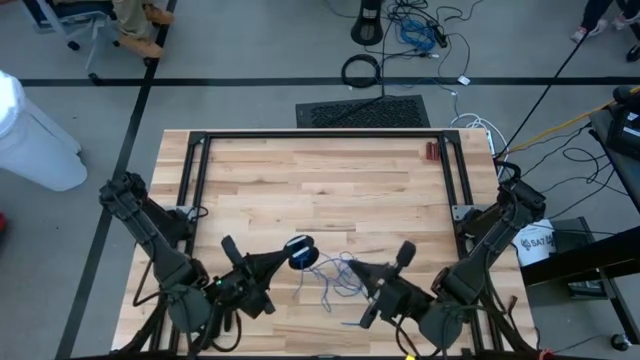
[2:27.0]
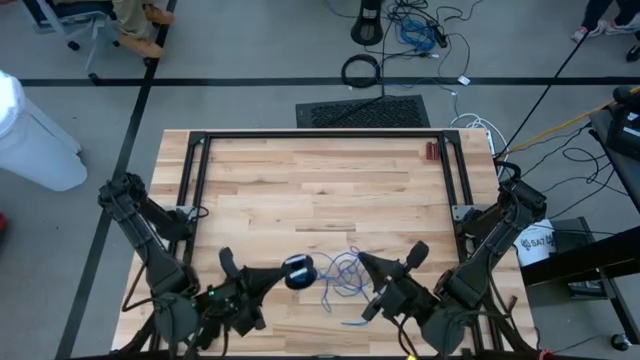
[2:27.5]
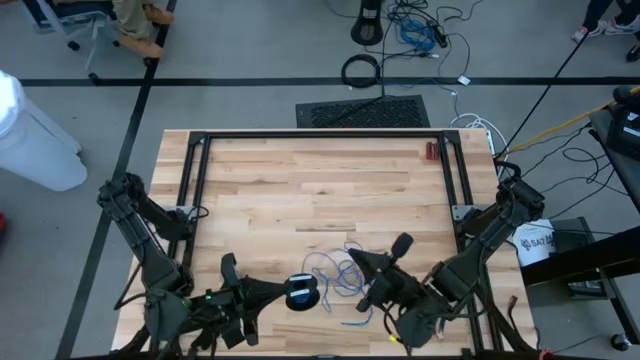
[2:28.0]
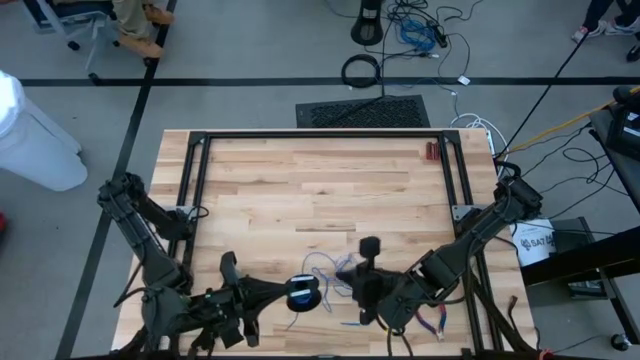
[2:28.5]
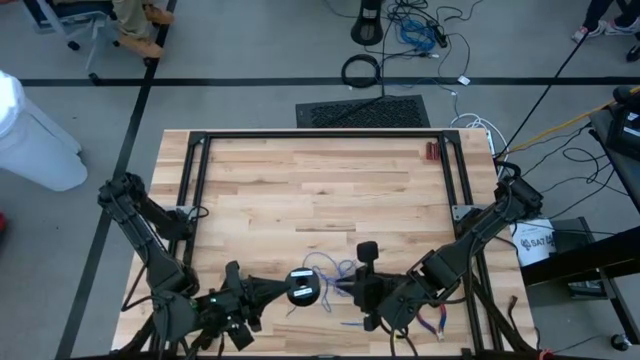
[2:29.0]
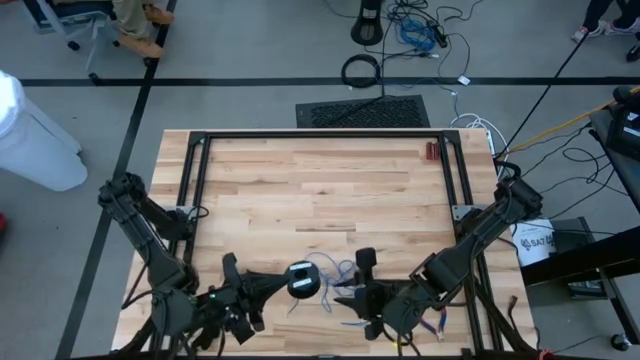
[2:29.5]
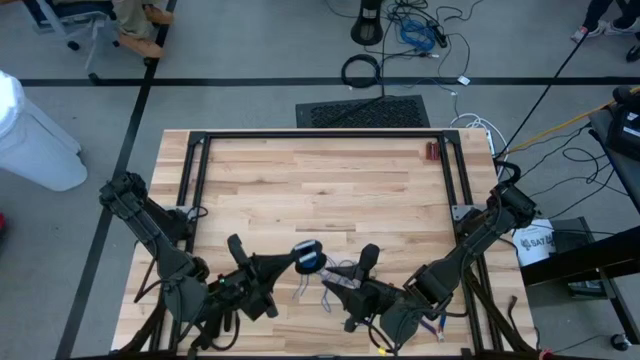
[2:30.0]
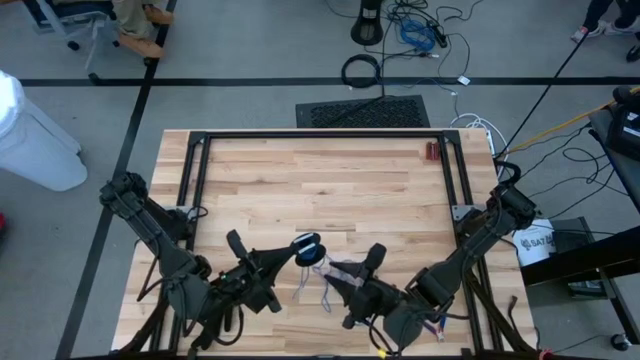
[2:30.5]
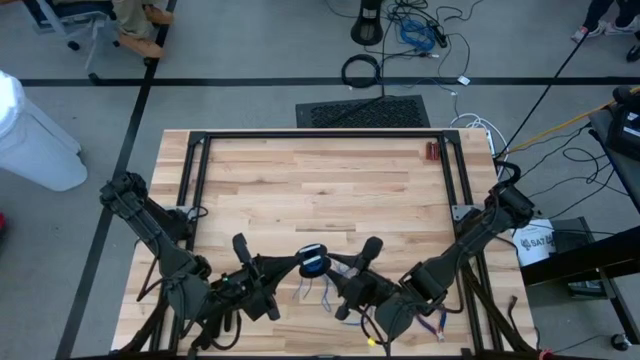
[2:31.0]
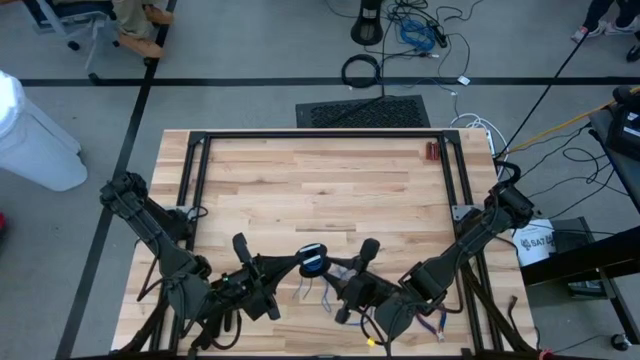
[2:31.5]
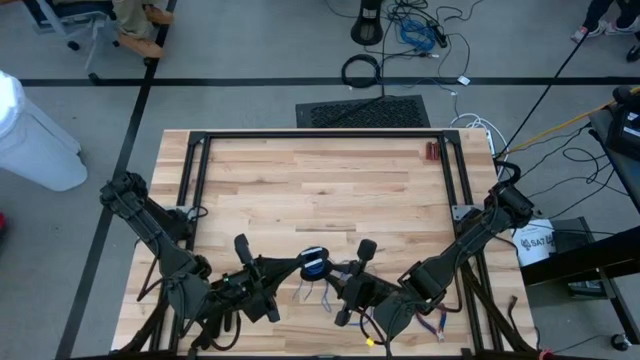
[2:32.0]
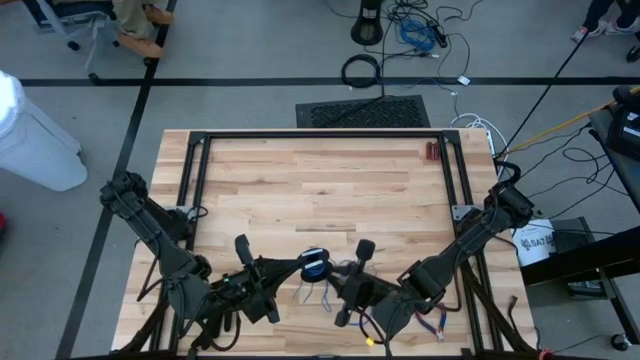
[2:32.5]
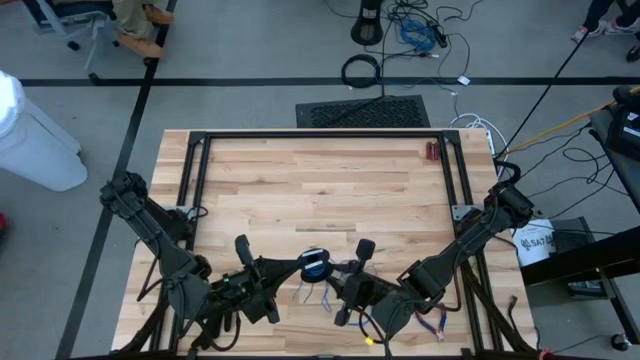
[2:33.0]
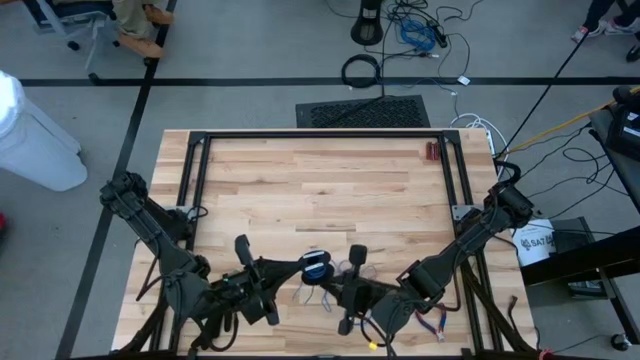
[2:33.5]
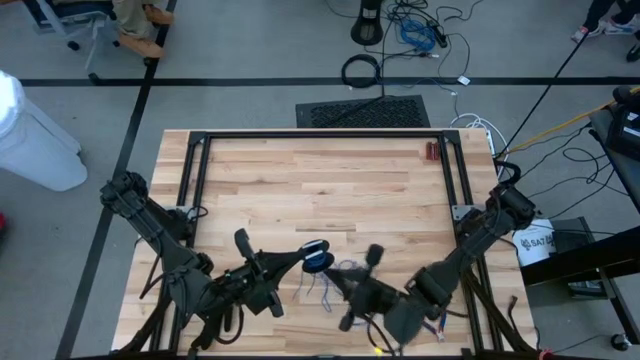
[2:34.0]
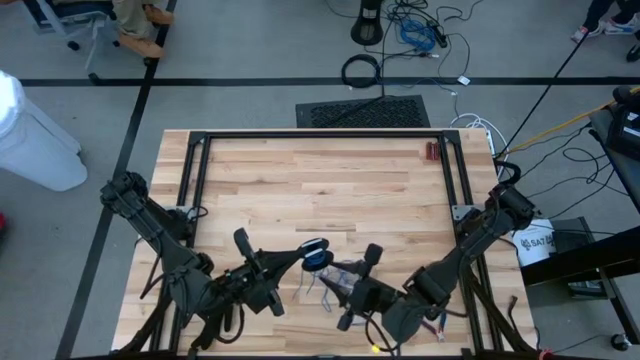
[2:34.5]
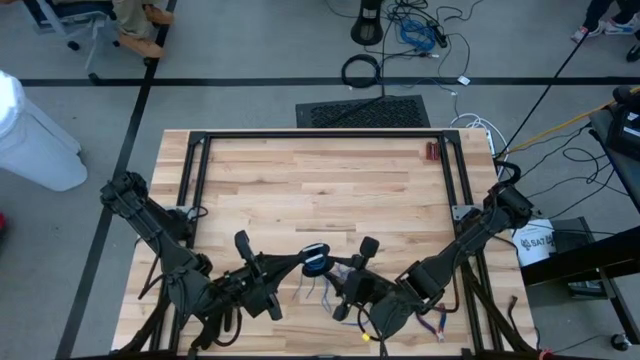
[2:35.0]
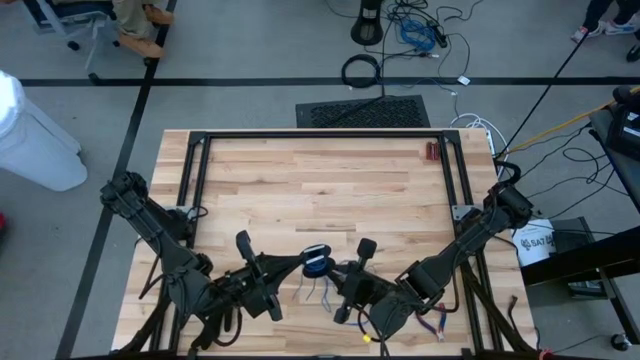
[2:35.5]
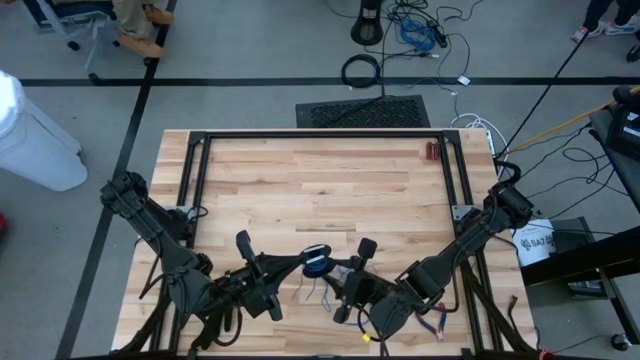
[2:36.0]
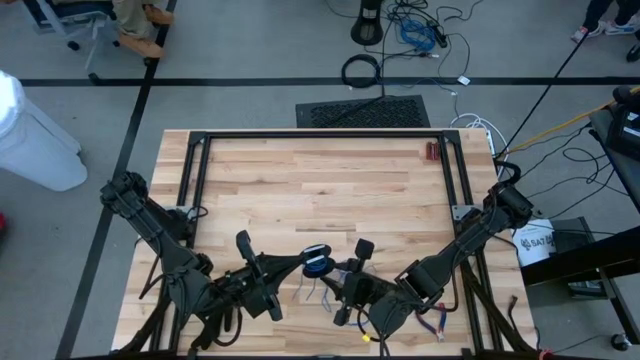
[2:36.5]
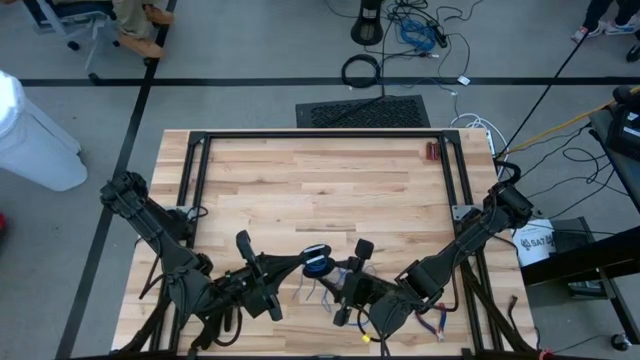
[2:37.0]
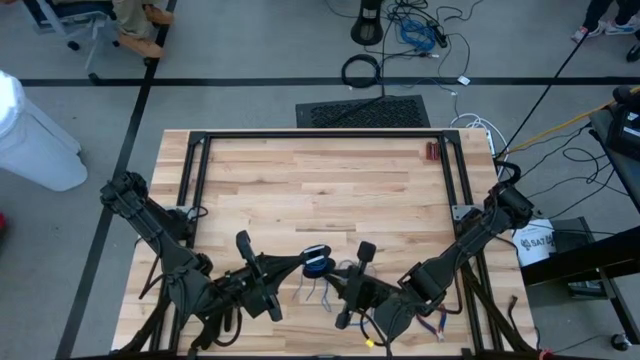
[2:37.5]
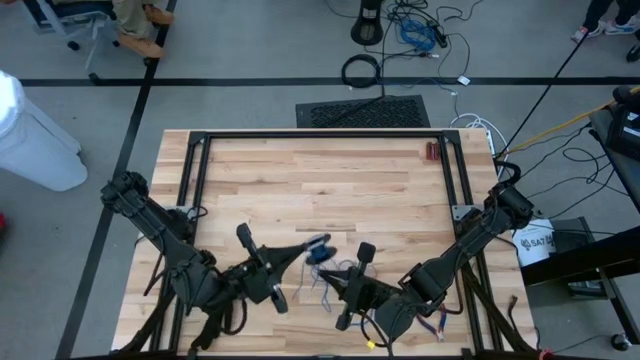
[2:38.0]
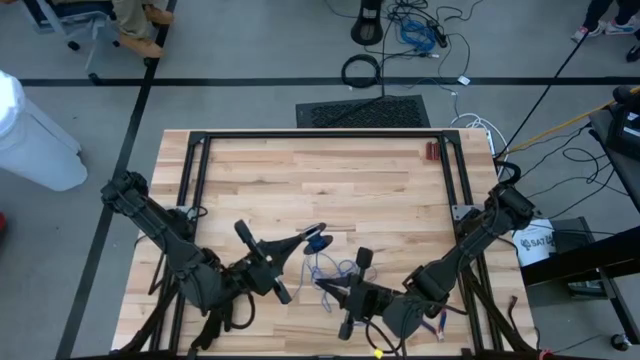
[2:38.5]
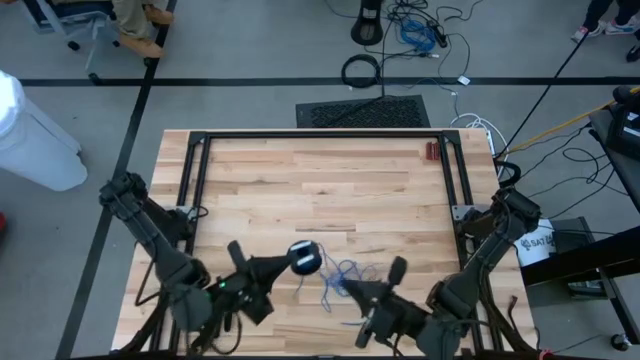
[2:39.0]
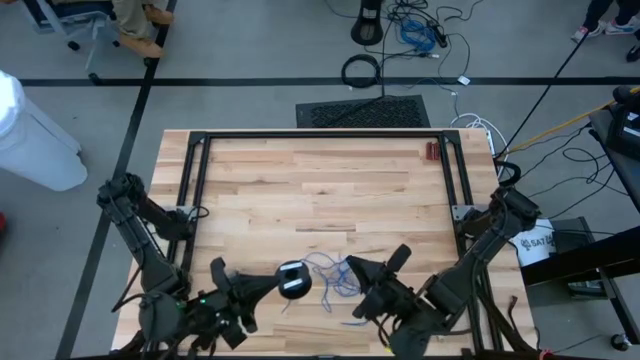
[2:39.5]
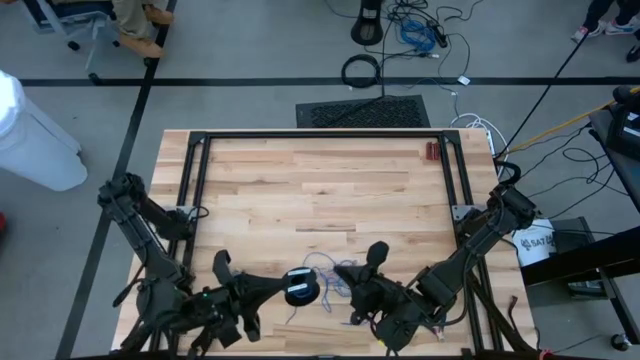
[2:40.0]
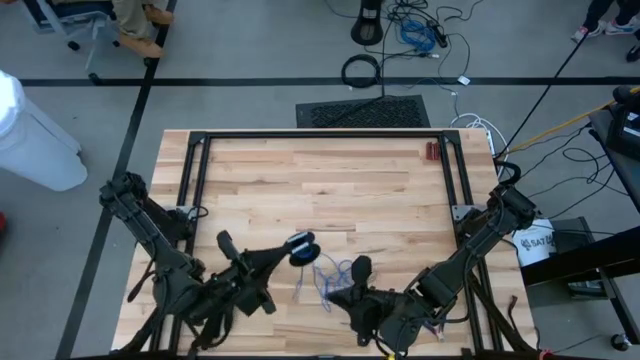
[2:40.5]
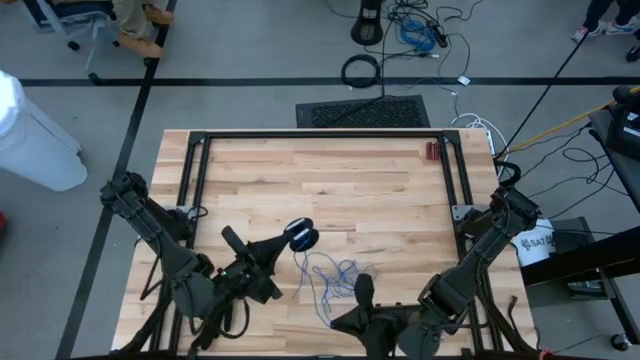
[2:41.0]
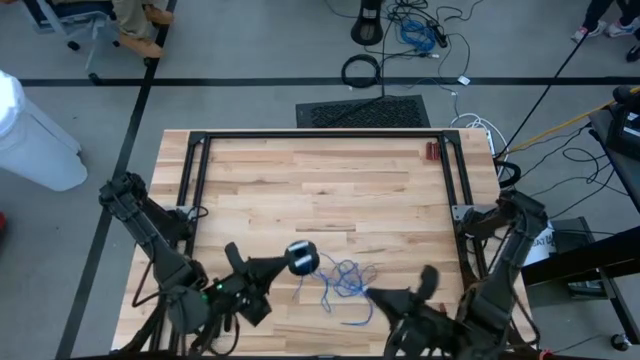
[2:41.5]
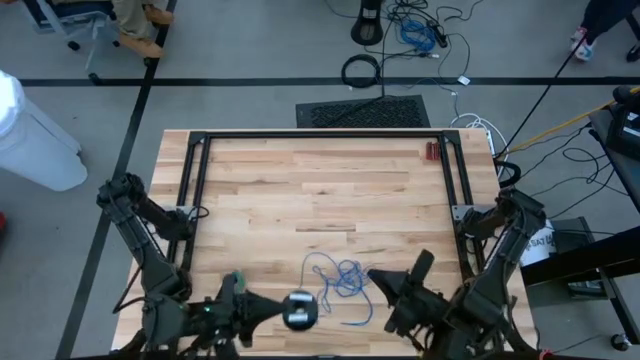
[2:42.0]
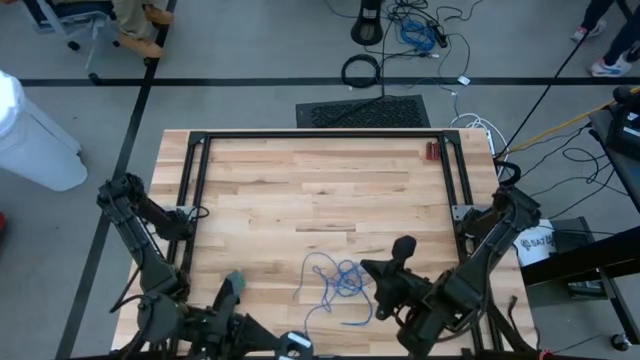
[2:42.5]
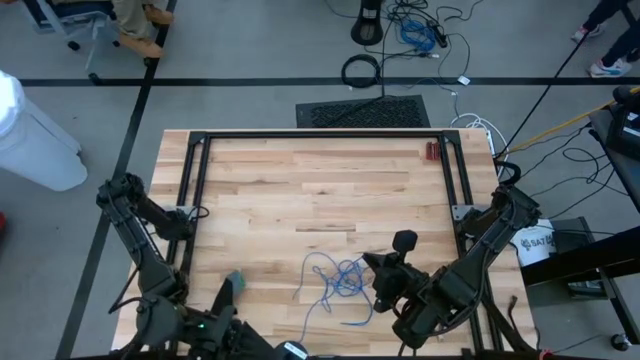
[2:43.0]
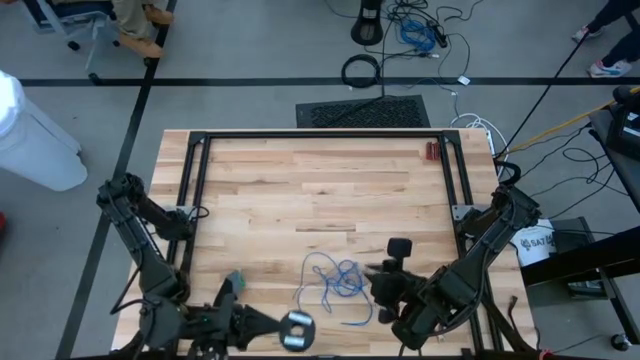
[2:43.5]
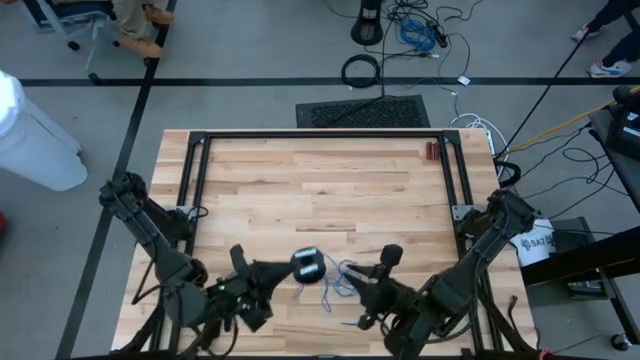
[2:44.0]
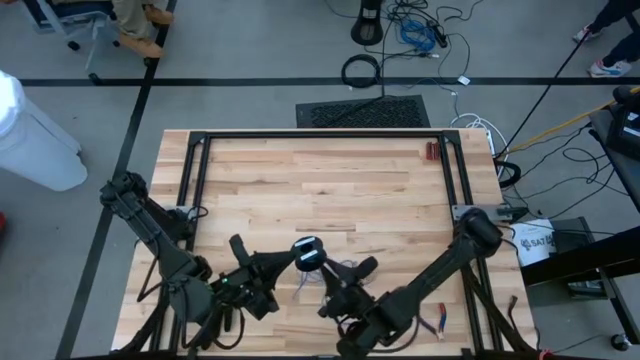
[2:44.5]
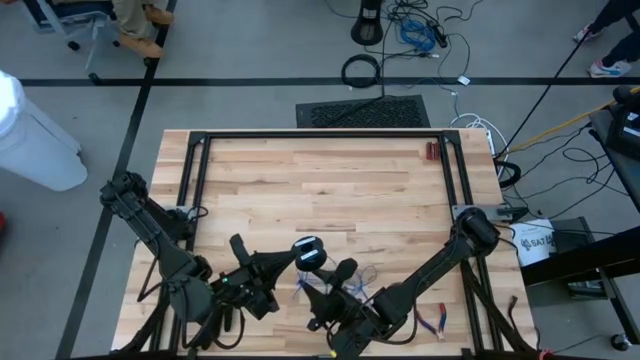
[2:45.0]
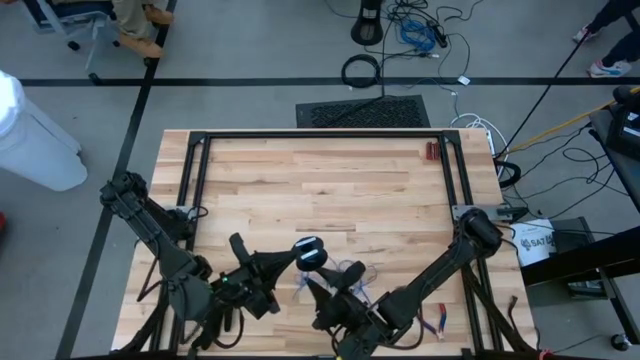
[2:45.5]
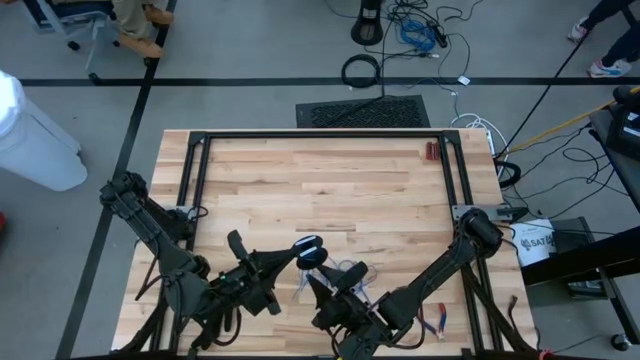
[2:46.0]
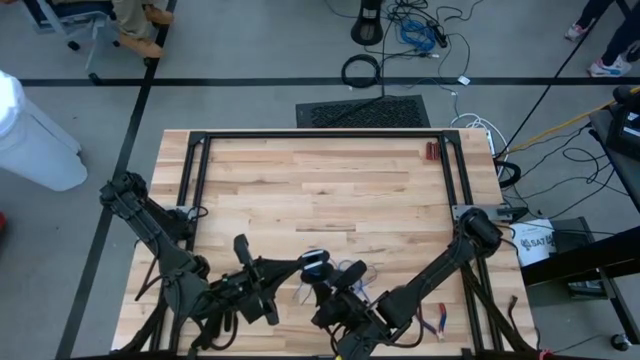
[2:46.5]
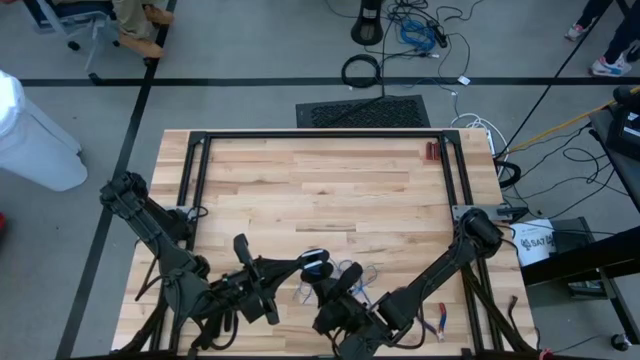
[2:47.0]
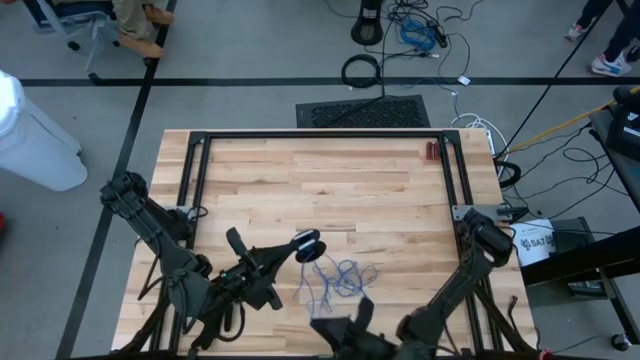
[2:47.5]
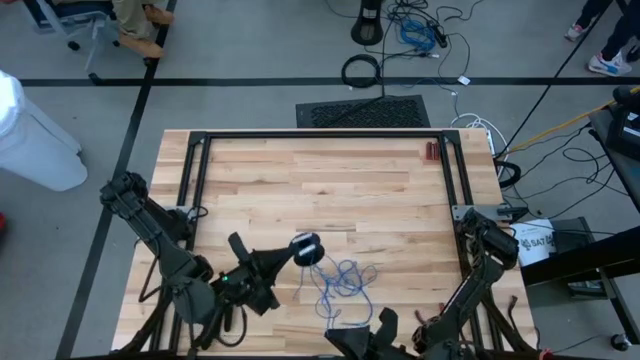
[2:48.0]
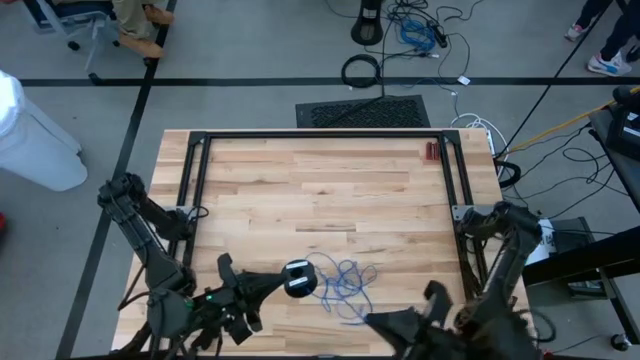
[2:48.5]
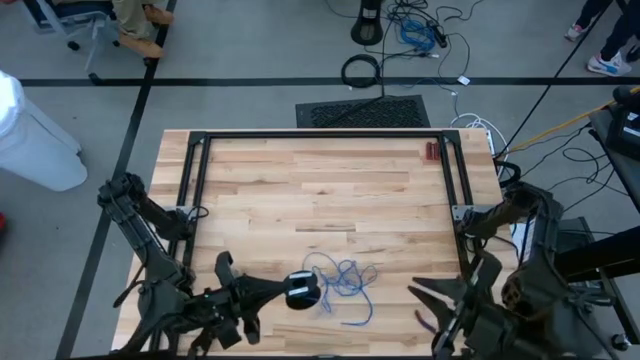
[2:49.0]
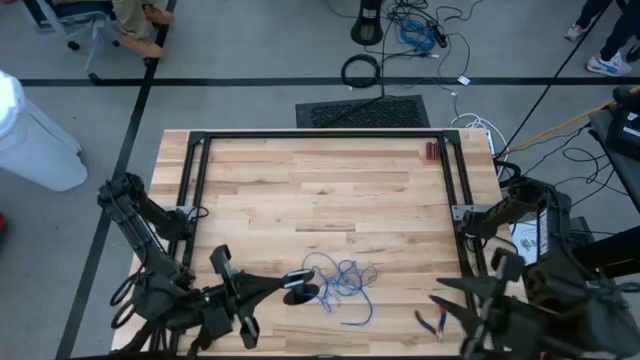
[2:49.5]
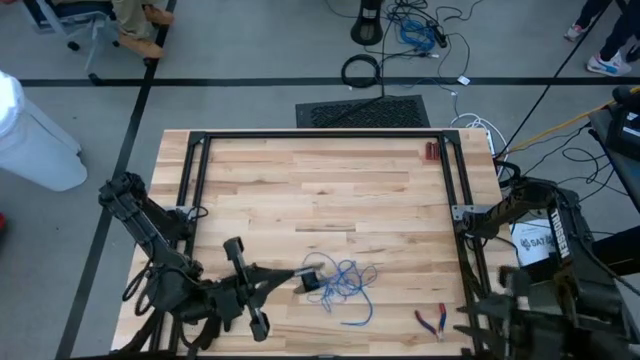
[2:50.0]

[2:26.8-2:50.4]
Task: Coil cords
Uncoil the blue wire from the black spool
